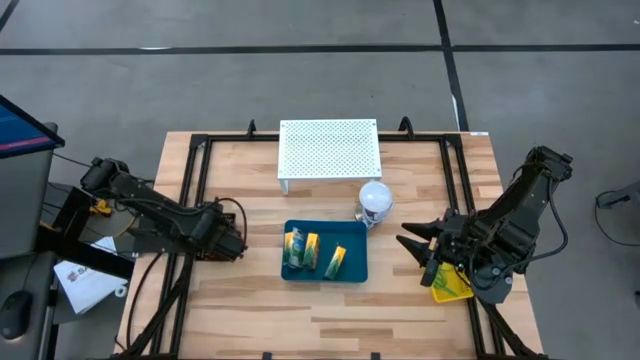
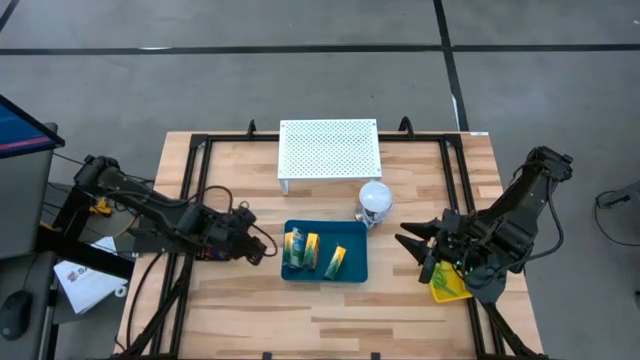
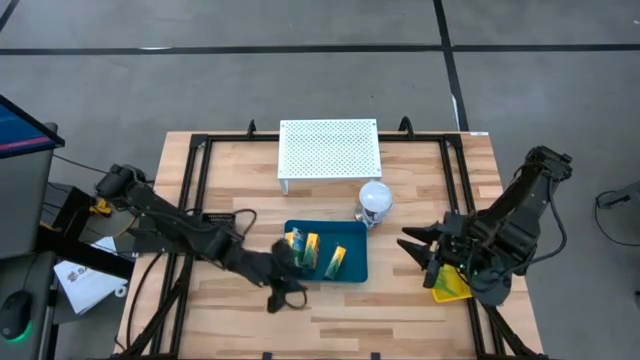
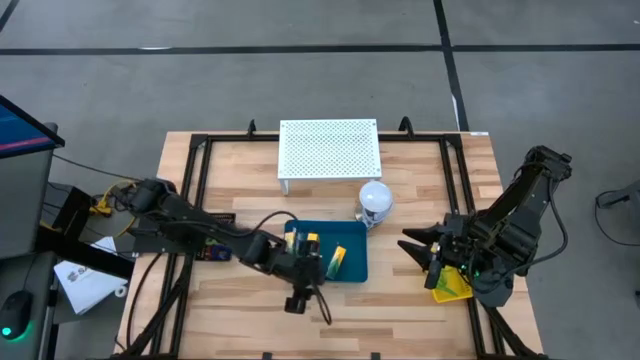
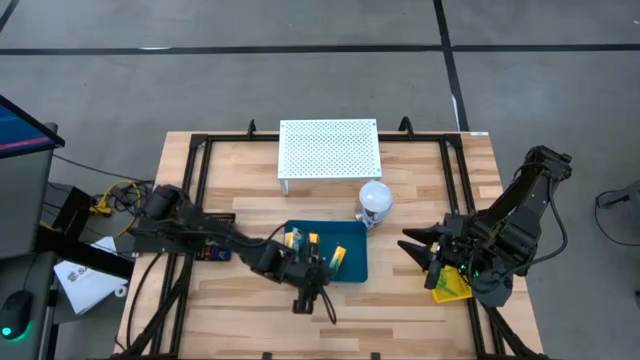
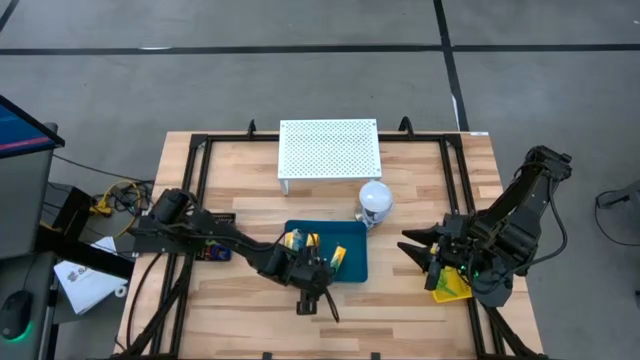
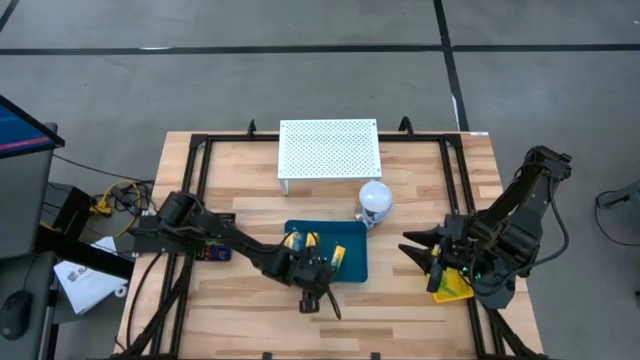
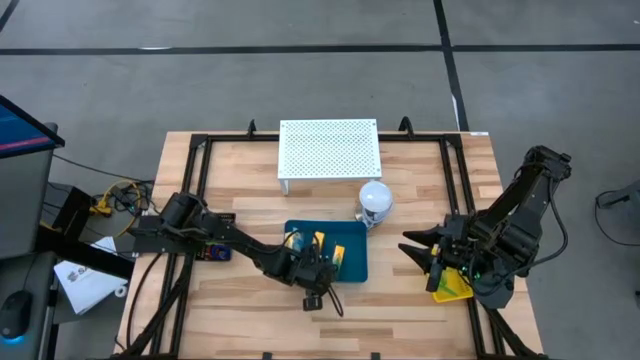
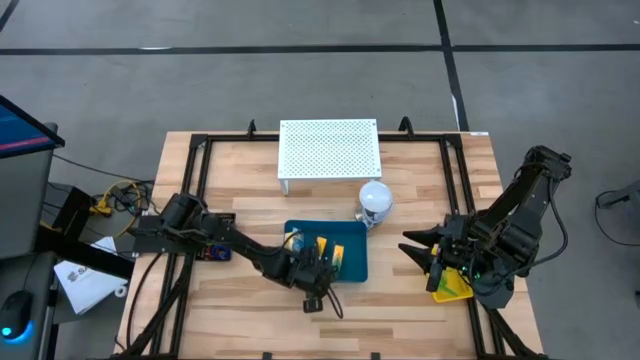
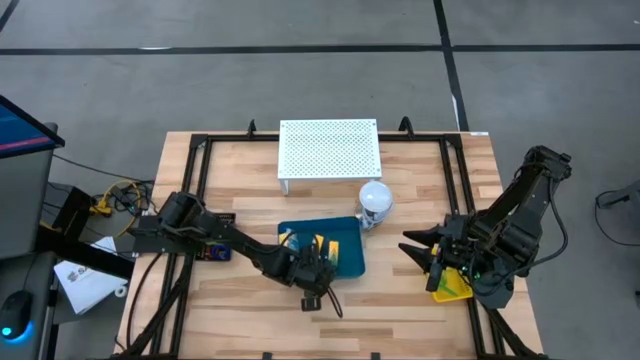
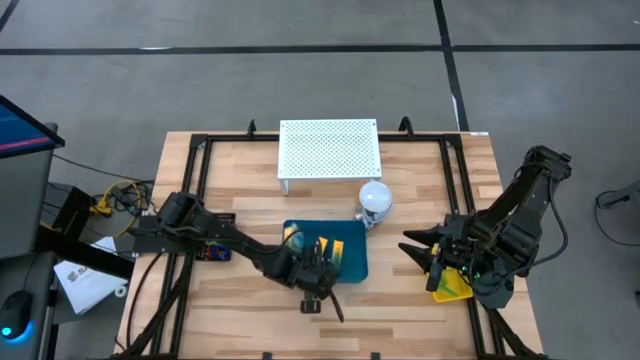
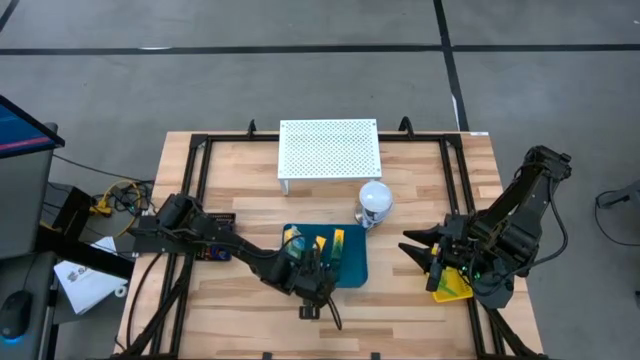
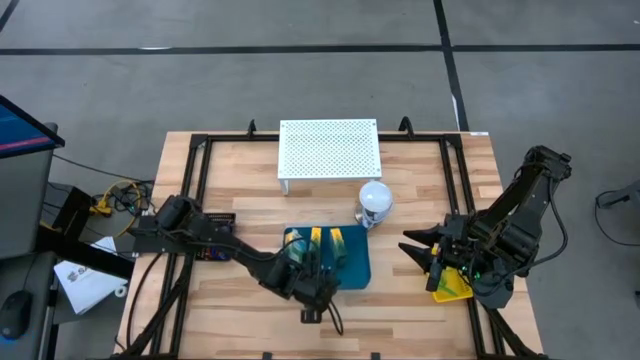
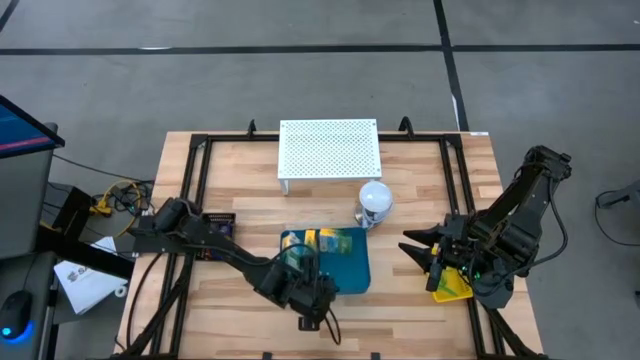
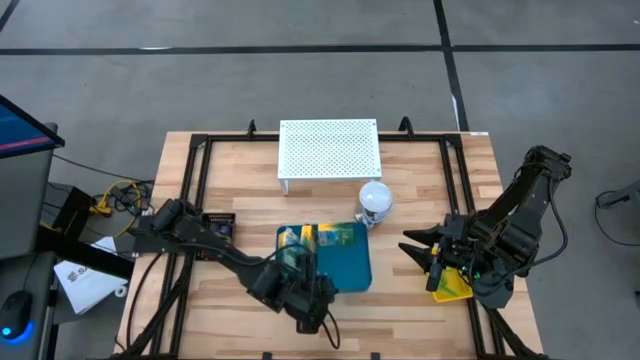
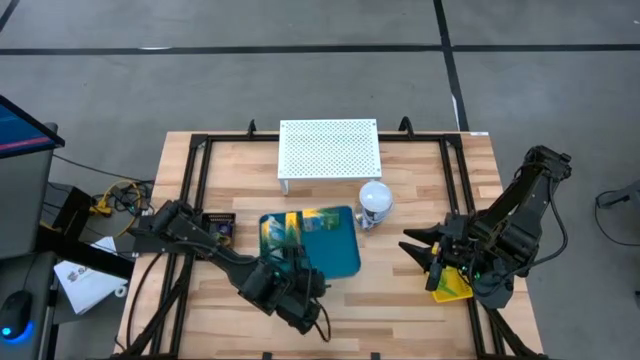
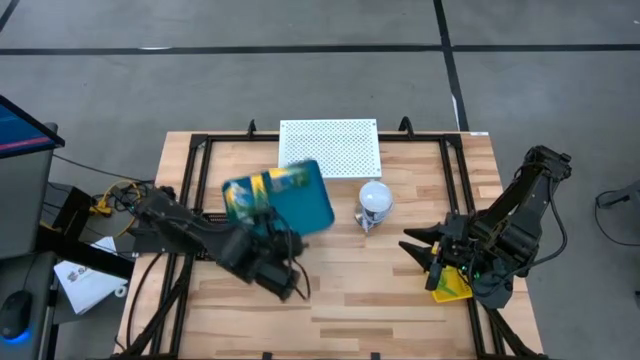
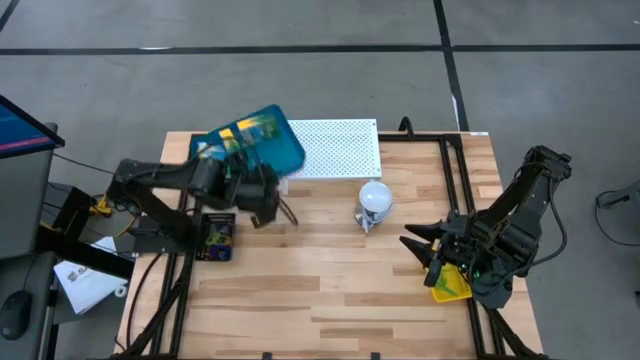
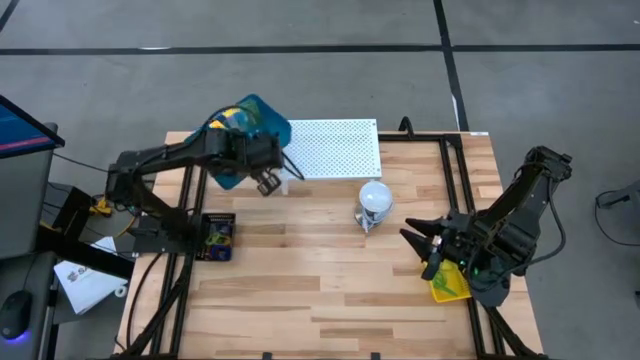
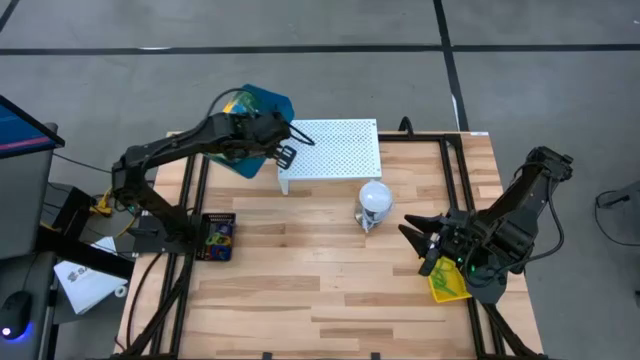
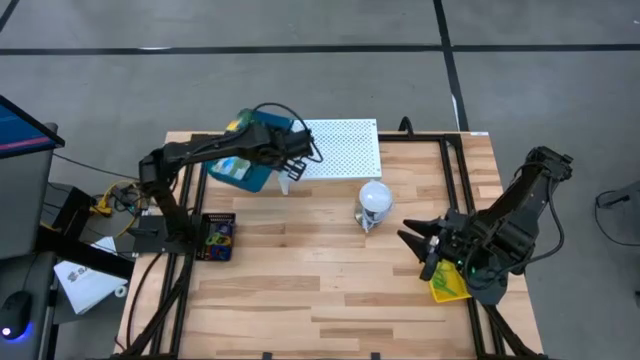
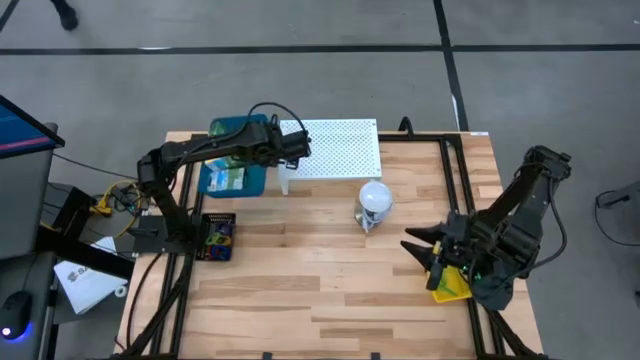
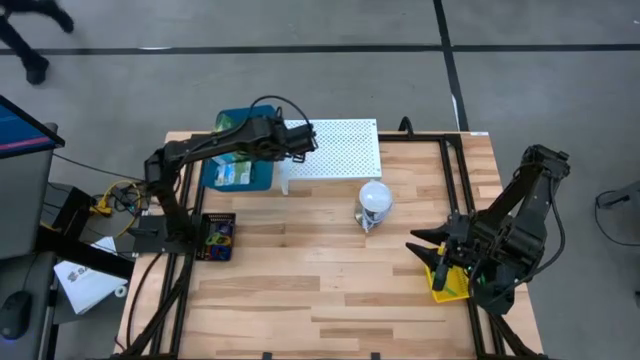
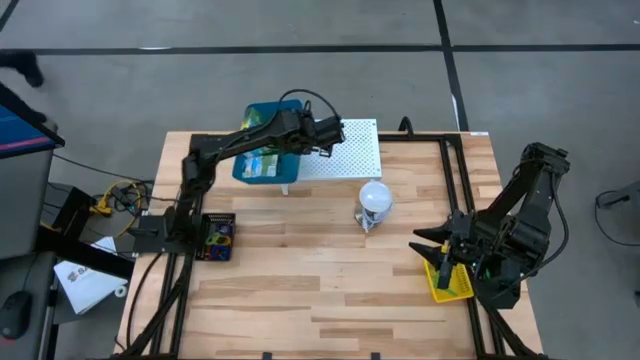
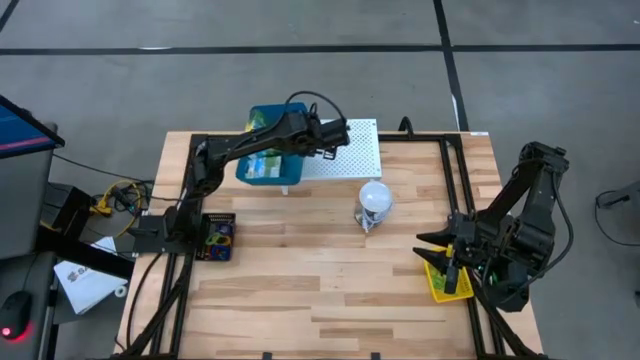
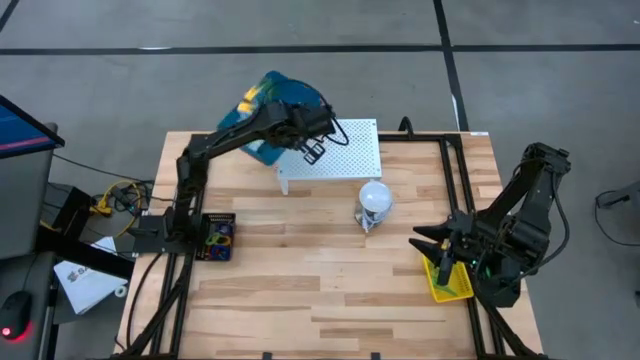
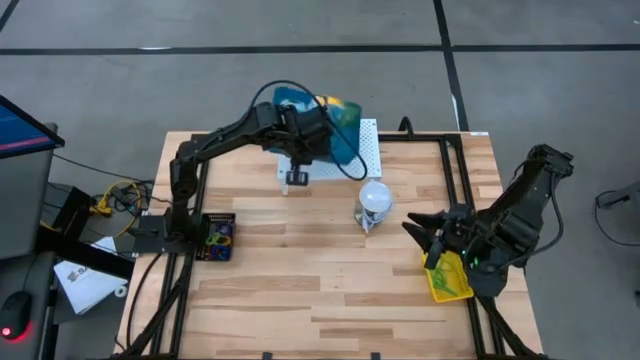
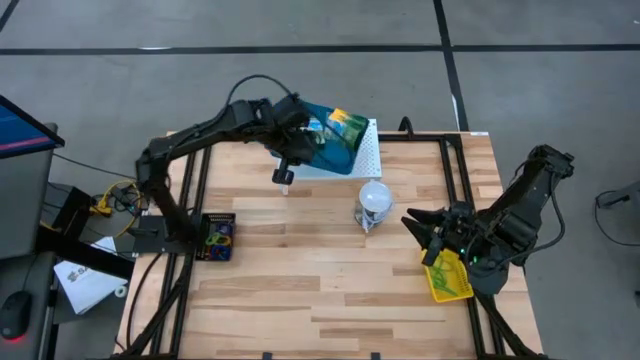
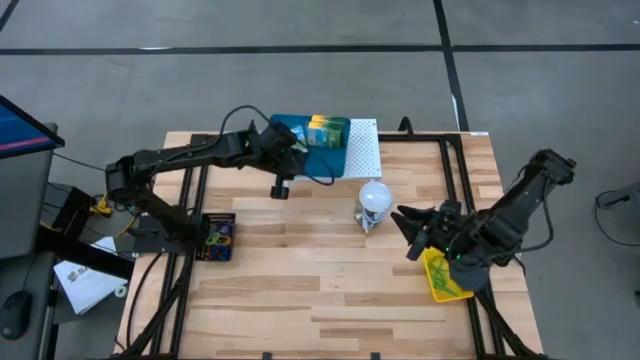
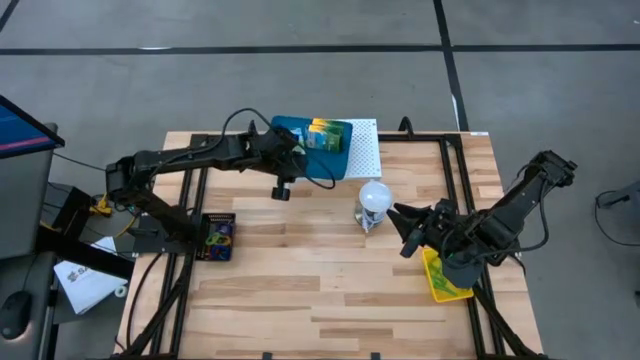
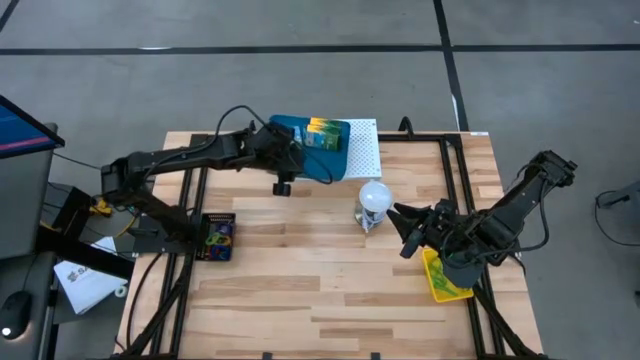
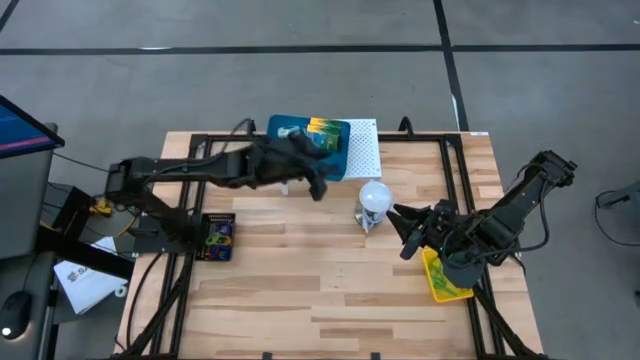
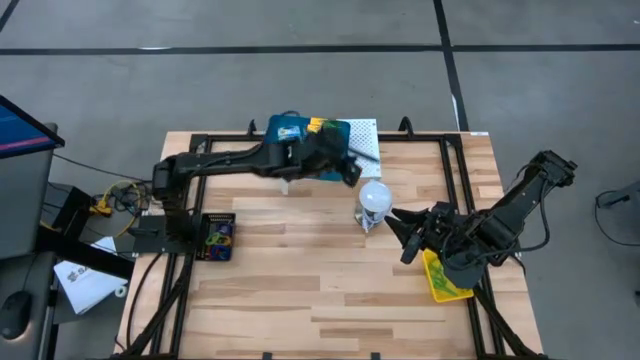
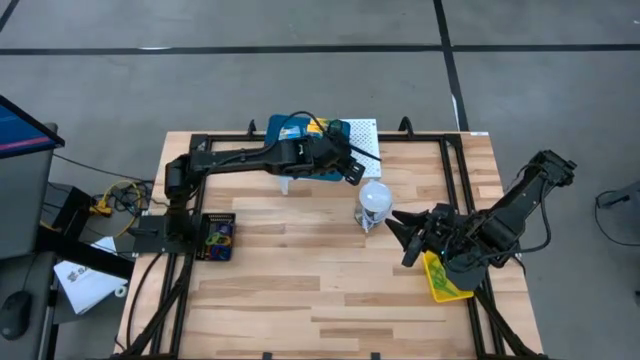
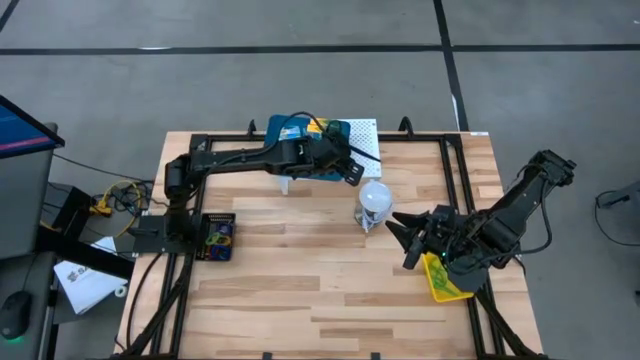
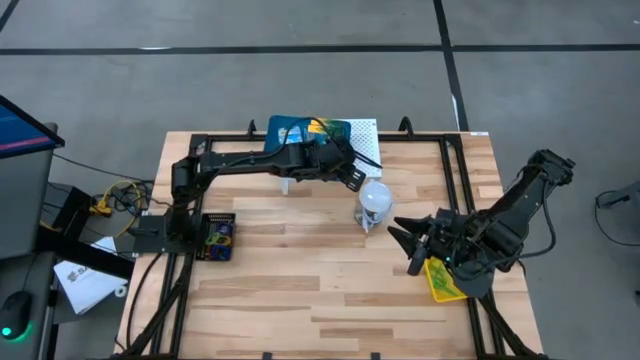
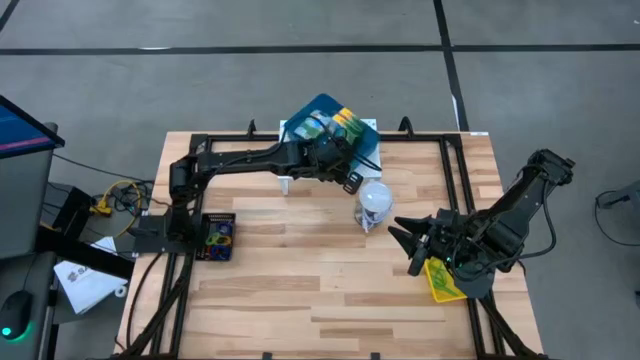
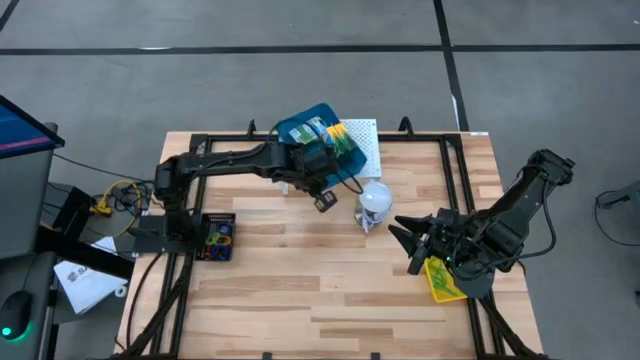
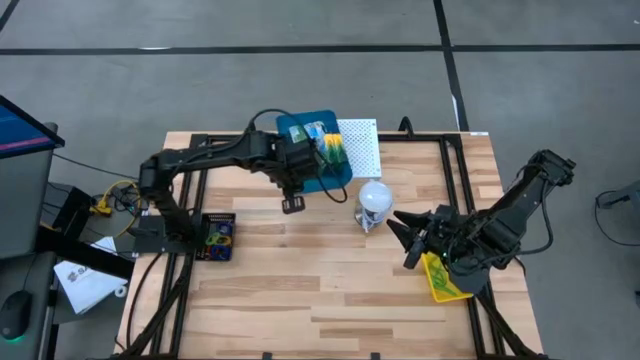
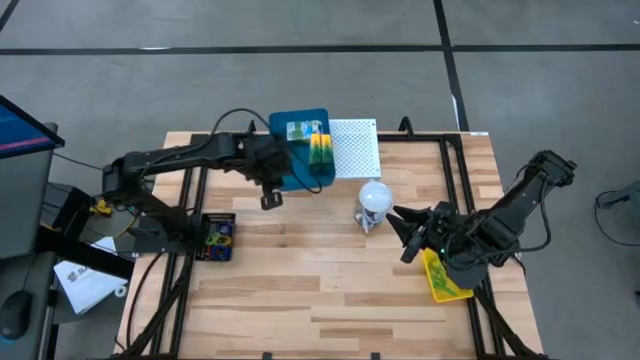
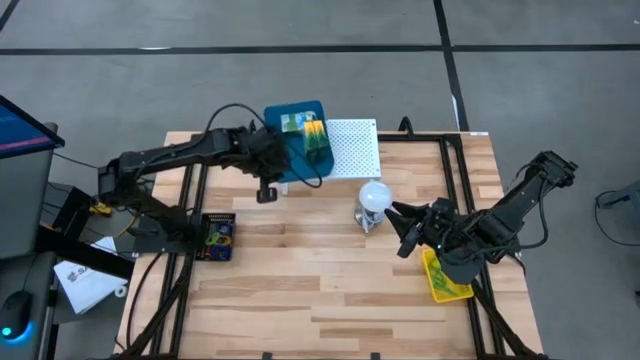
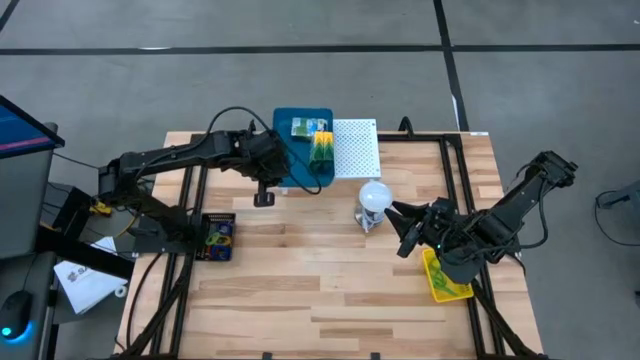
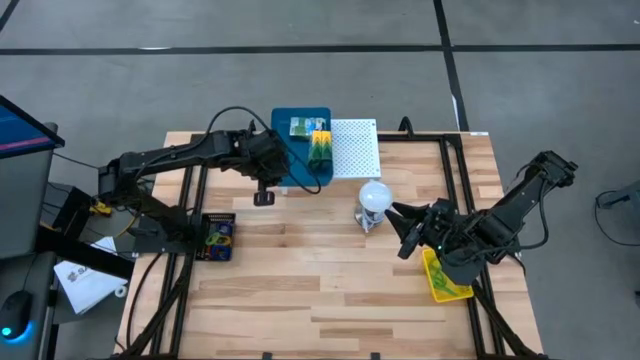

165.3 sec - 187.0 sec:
Task: Pick & Place Office Desk Supplies
Put the blue bin with crayon boxes on the shelf
